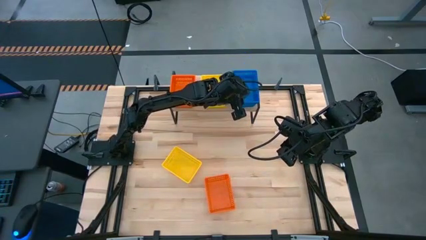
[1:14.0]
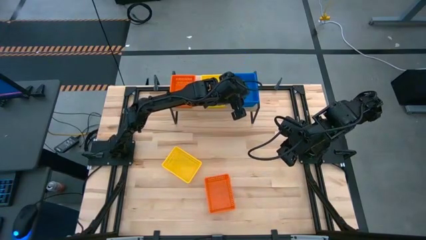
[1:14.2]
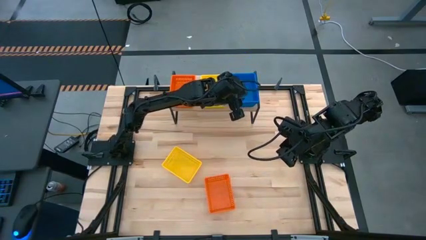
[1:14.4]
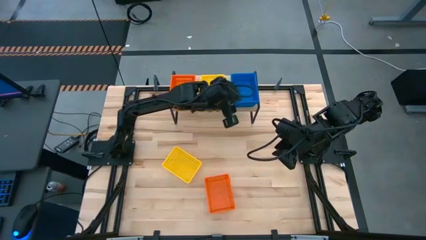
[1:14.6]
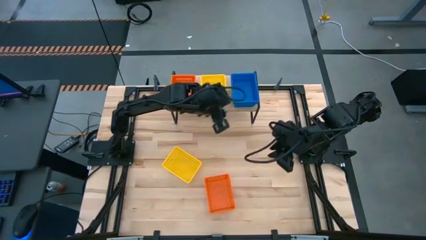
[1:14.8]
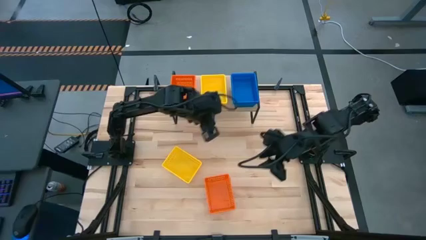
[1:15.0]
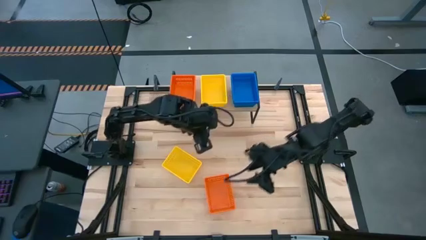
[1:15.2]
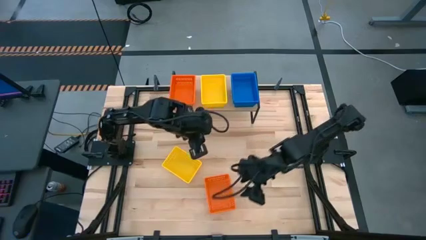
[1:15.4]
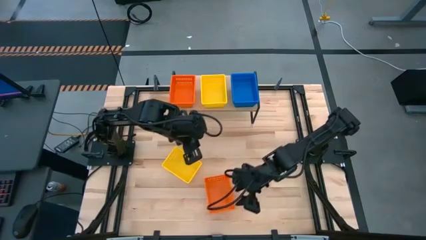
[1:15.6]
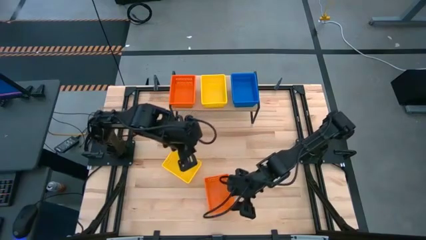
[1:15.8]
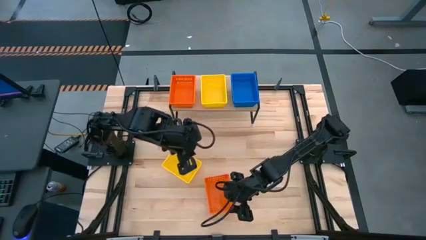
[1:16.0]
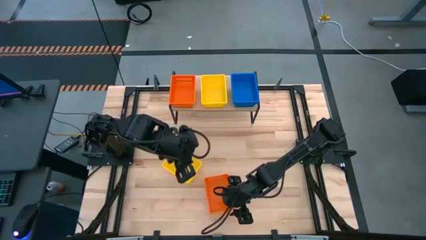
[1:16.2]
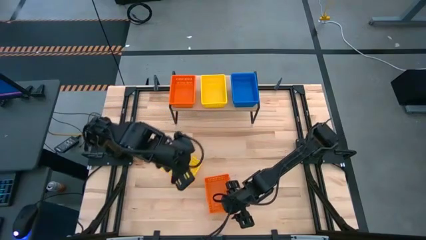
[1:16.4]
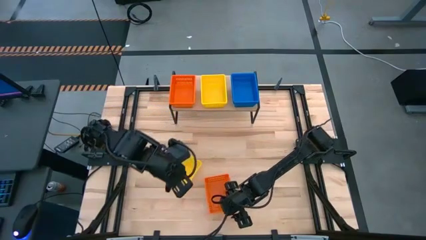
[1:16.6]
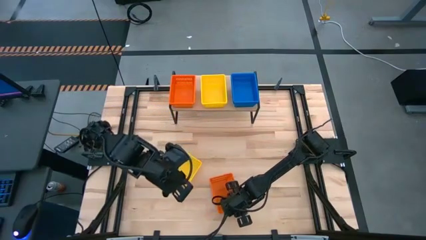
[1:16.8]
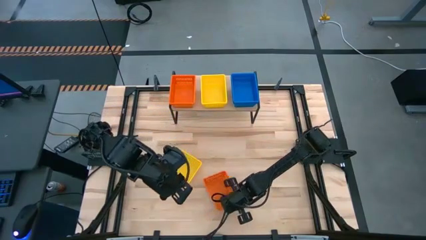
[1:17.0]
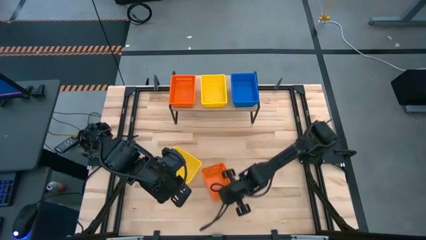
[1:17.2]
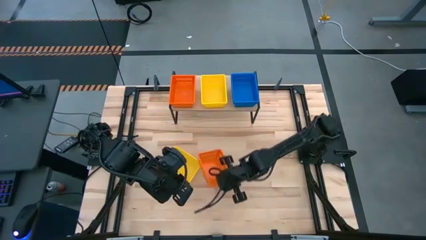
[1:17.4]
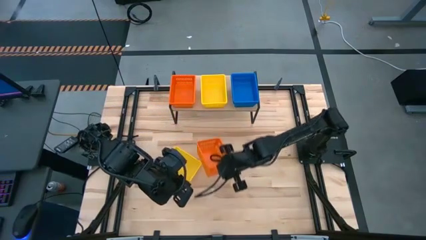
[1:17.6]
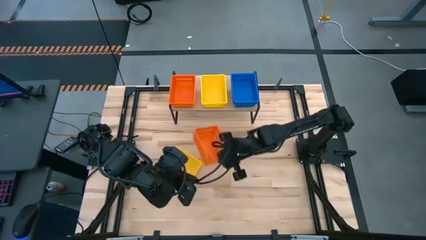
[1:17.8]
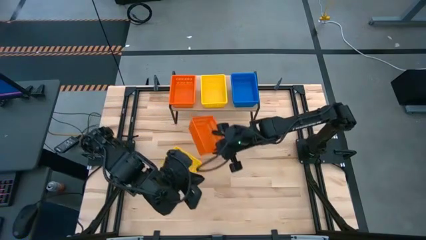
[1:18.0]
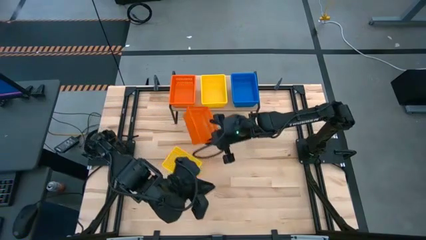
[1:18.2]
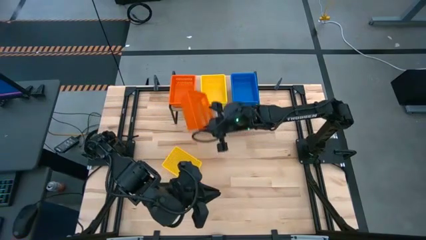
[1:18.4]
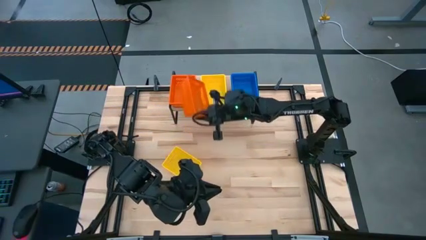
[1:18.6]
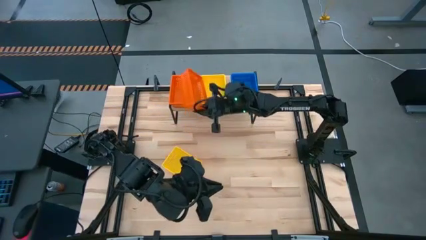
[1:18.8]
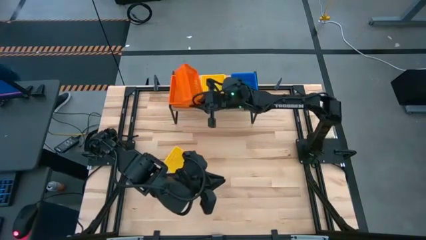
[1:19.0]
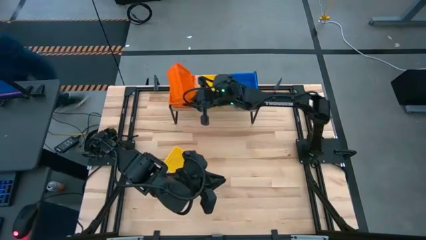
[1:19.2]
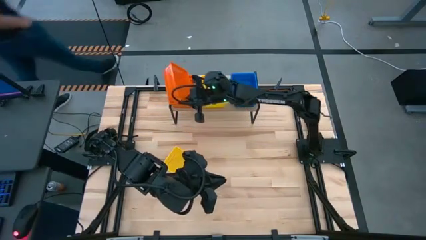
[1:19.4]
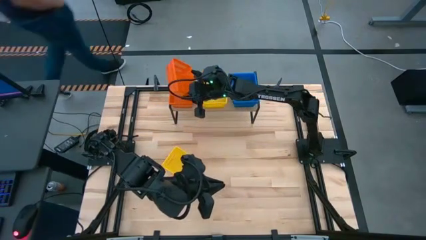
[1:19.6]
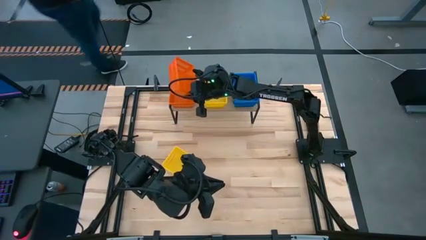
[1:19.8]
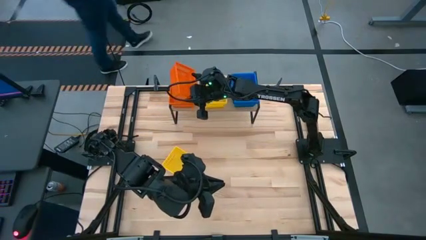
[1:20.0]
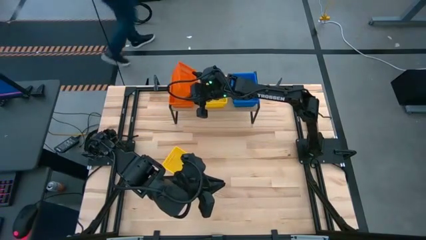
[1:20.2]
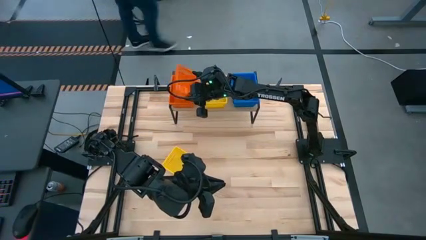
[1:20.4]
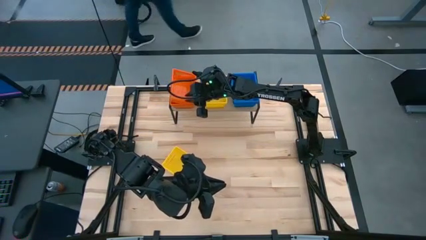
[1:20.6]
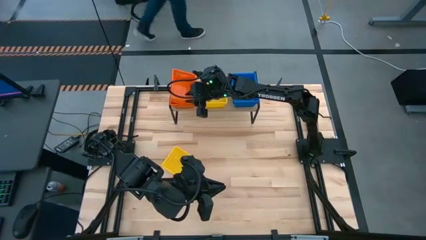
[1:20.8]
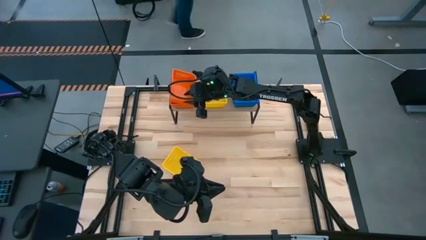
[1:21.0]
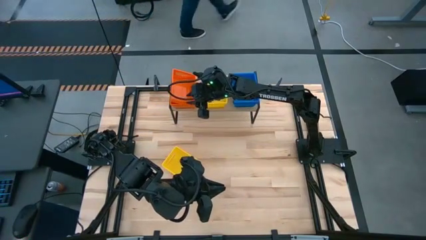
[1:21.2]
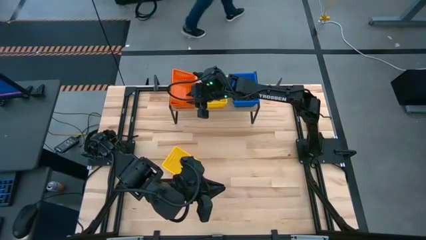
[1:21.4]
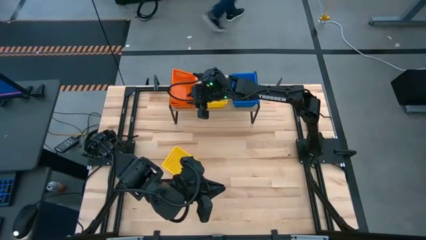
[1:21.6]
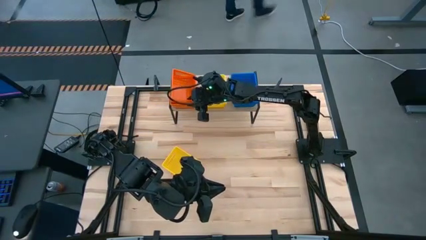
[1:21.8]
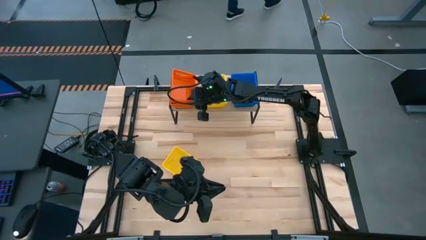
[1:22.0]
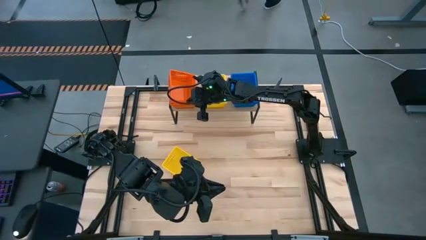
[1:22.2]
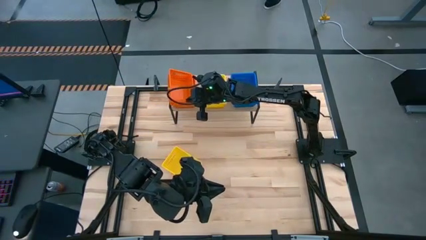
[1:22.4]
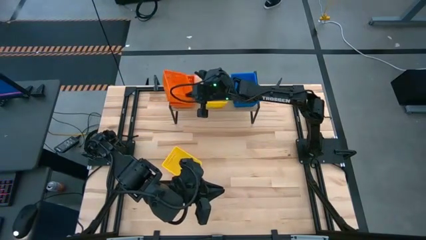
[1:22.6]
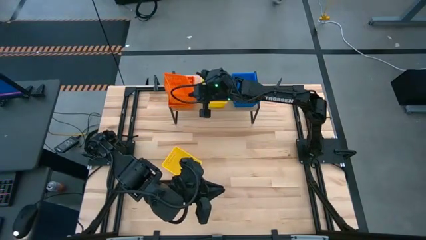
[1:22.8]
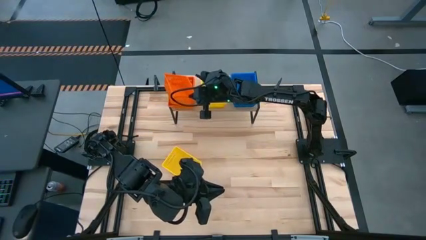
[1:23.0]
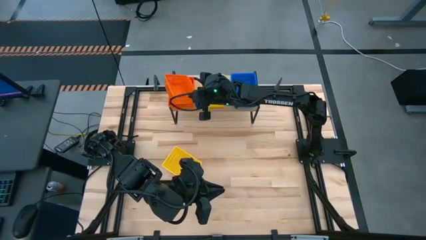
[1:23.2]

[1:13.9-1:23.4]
Task: Stack baskets on shelf by color
Stack the orange bin on top of the stacked orange bins on the shelf

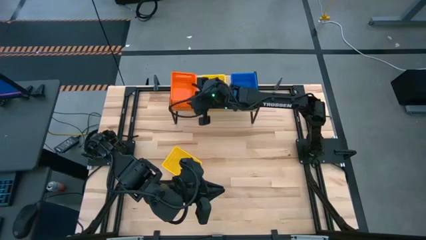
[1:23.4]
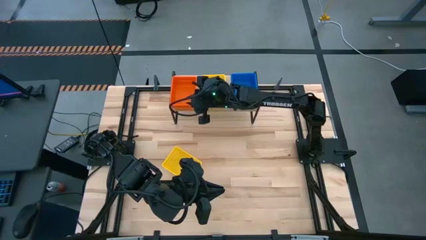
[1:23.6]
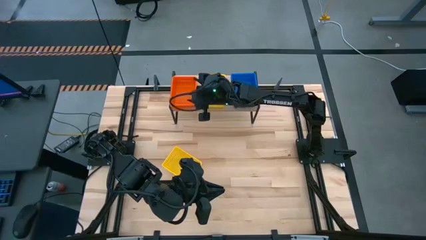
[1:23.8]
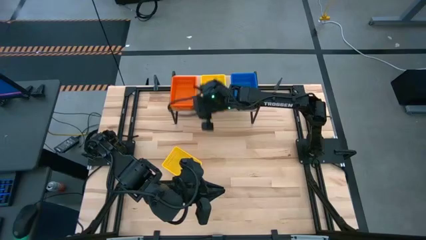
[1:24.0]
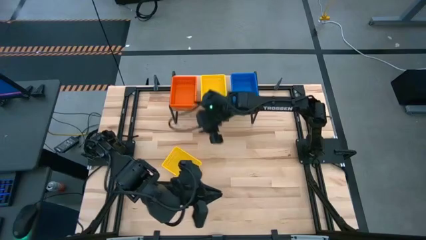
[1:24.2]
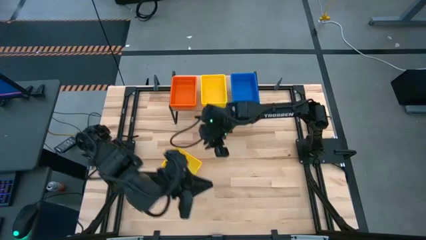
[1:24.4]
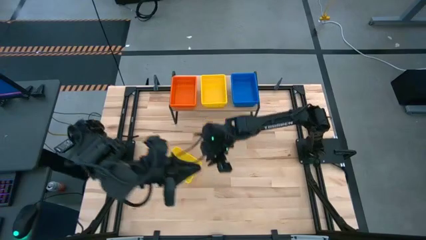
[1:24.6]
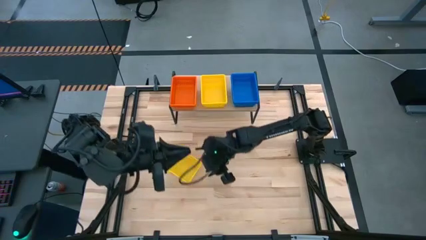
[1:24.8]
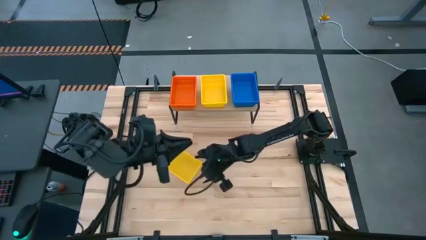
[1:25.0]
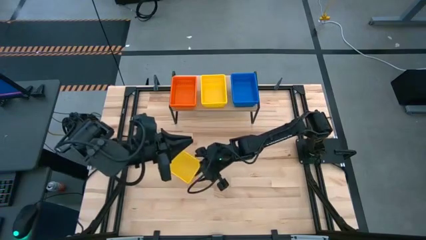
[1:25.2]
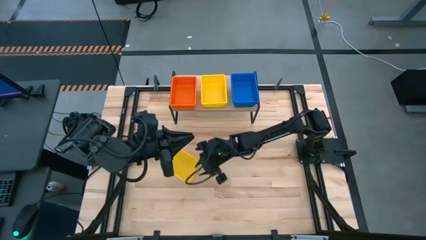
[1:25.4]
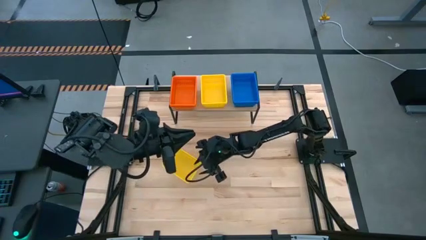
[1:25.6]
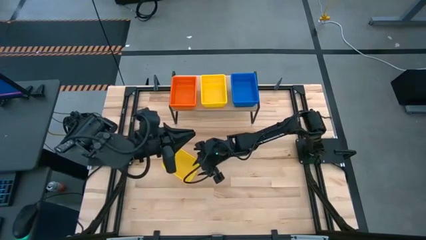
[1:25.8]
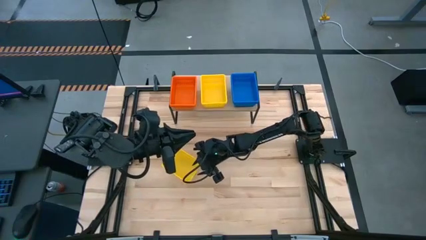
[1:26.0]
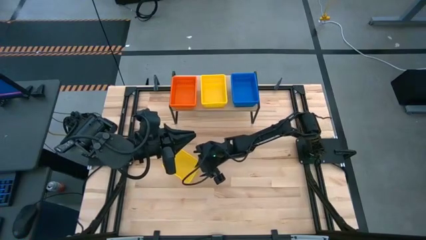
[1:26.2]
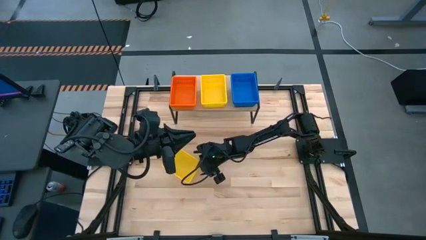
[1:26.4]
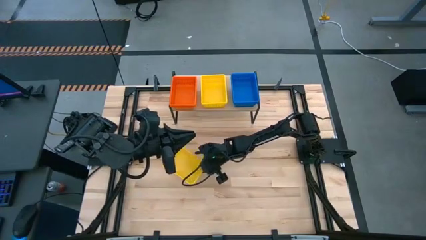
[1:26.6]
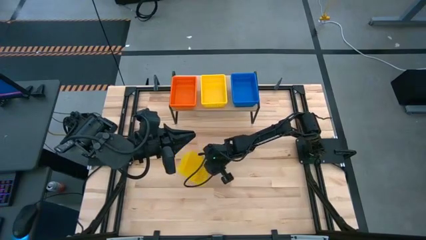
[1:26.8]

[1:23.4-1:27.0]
Stack the yellow bin on top of the stacked yellow bins on the shelf

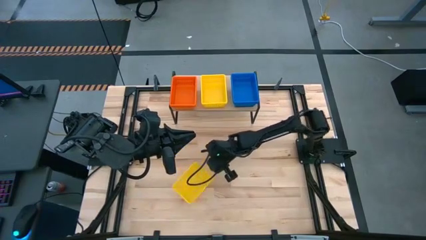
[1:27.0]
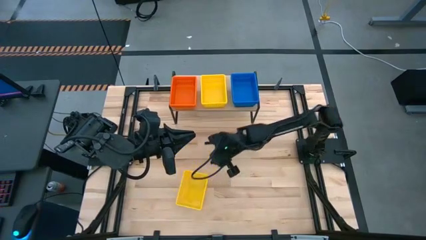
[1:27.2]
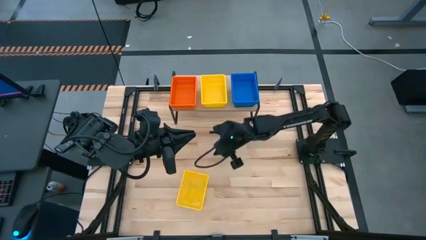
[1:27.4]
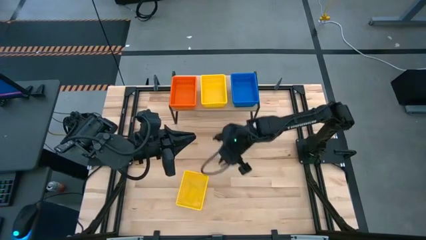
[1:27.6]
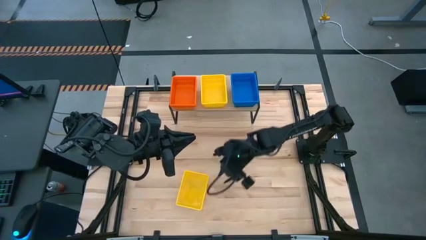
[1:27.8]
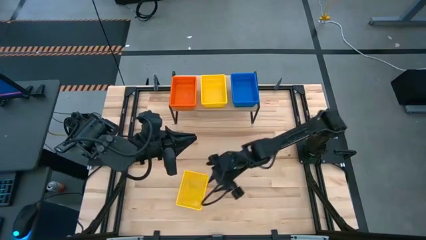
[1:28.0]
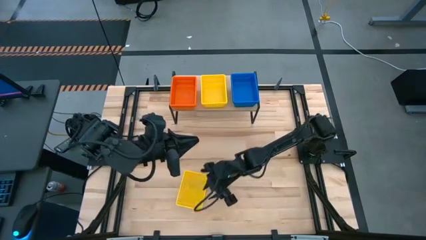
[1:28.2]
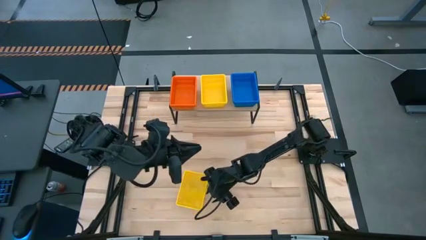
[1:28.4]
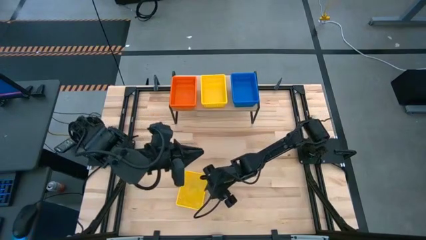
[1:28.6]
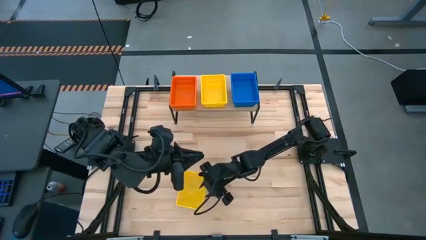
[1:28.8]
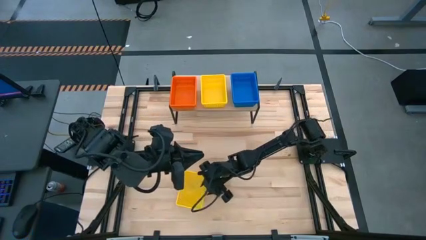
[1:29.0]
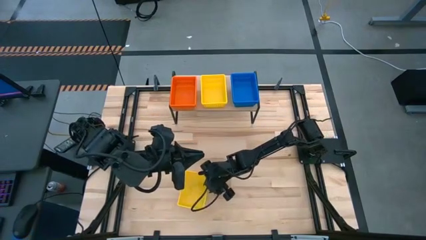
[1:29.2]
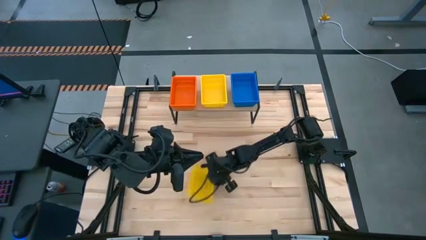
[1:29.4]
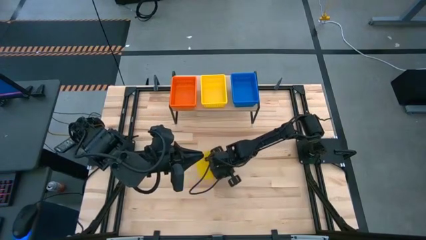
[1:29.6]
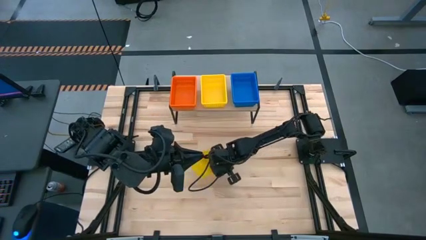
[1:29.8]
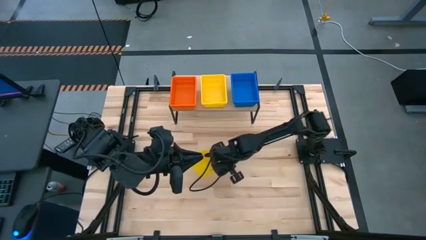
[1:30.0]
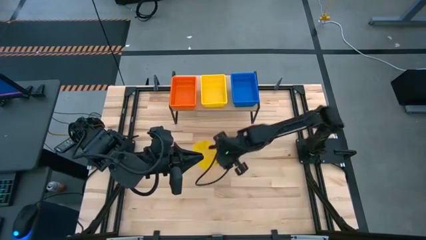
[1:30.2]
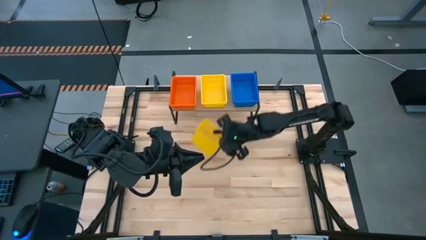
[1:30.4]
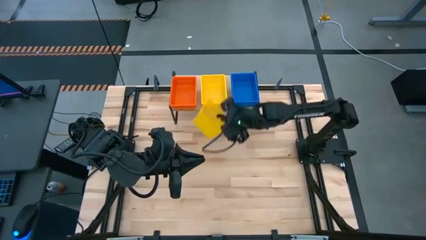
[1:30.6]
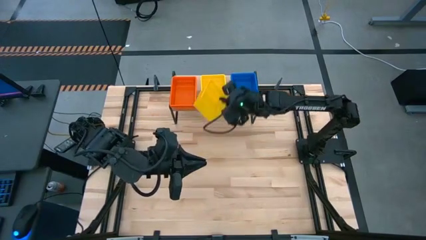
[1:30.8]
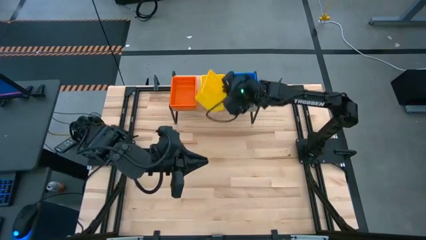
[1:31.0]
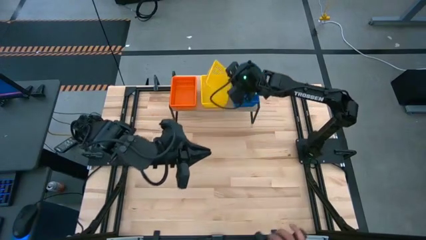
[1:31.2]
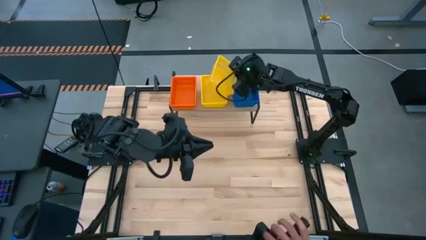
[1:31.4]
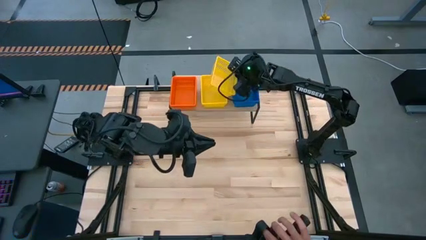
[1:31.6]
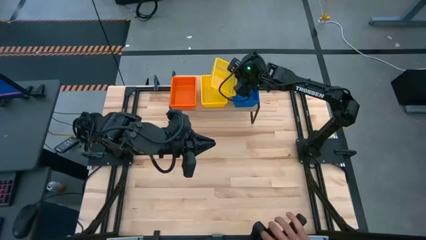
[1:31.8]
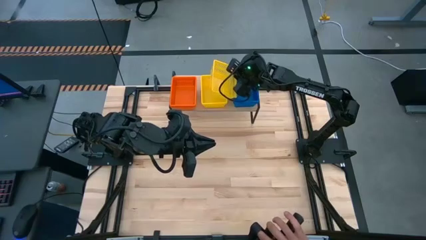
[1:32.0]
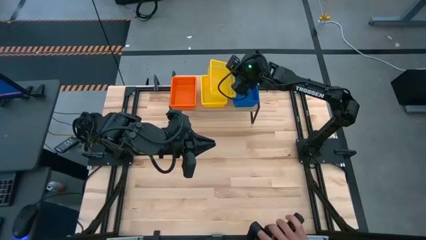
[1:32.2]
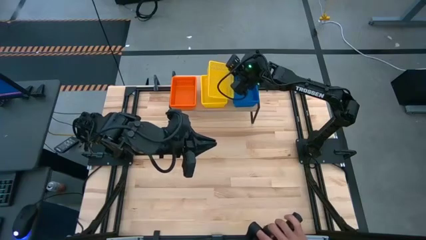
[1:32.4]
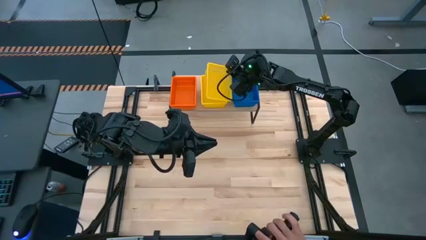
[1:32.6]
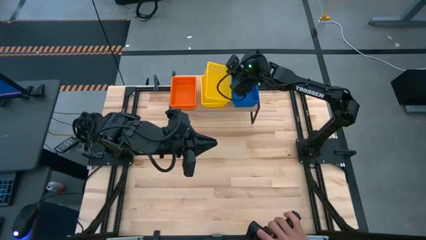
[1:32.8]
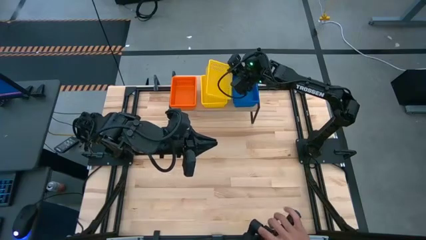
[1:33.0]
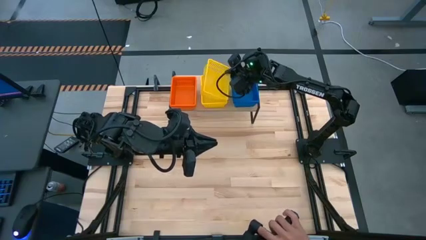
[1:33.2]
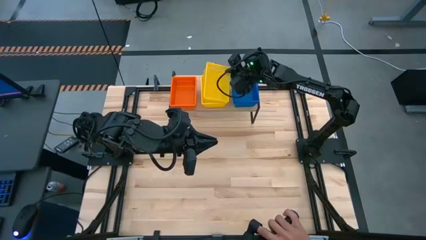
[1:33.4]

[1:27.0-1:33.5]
Stack the yellow bin on top of the stacked yellow bins on the shelf
